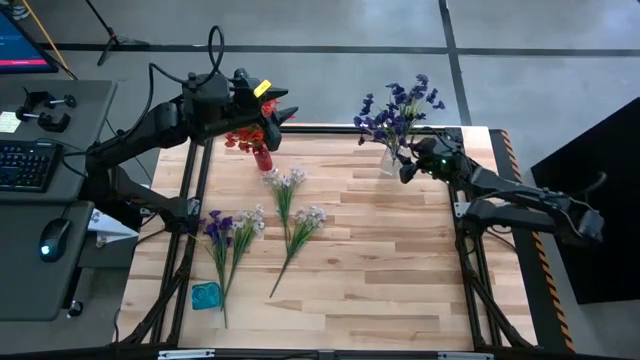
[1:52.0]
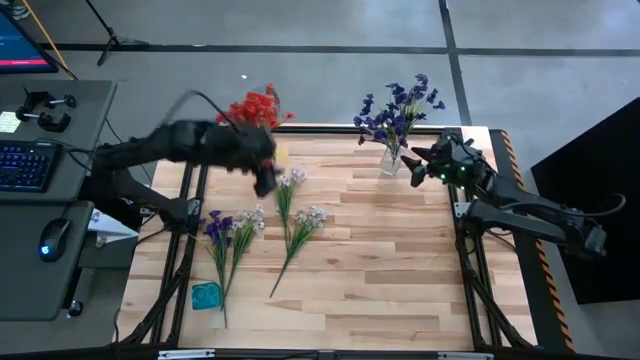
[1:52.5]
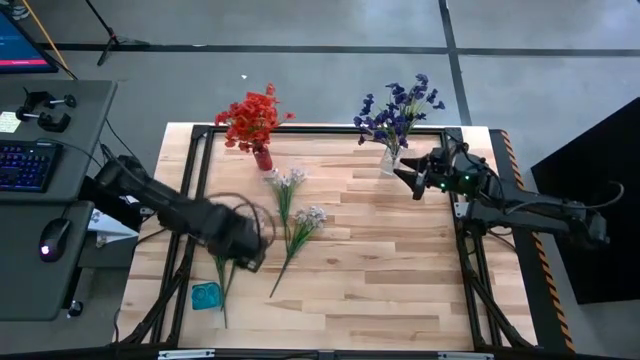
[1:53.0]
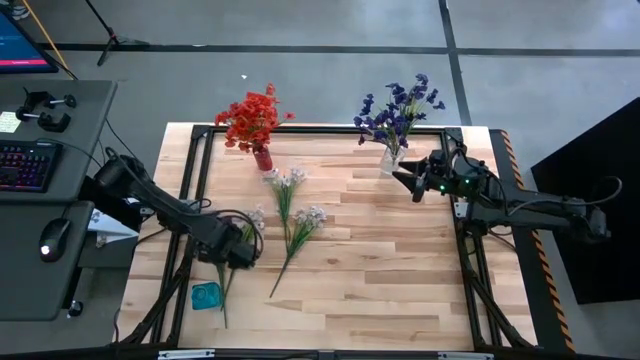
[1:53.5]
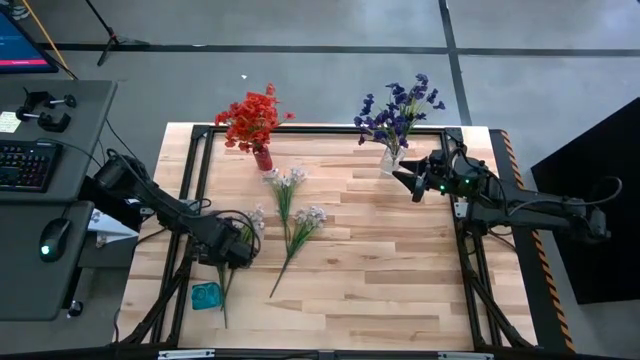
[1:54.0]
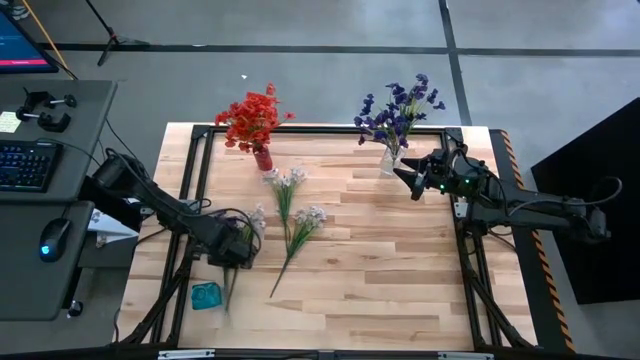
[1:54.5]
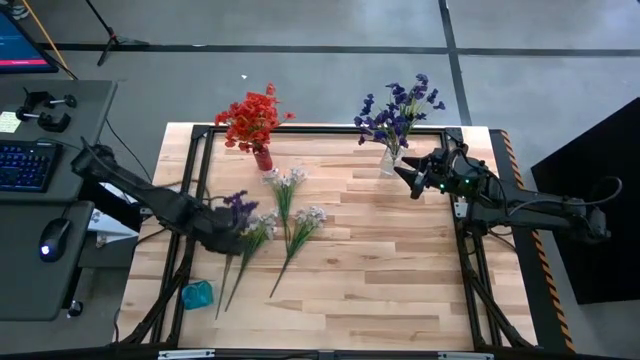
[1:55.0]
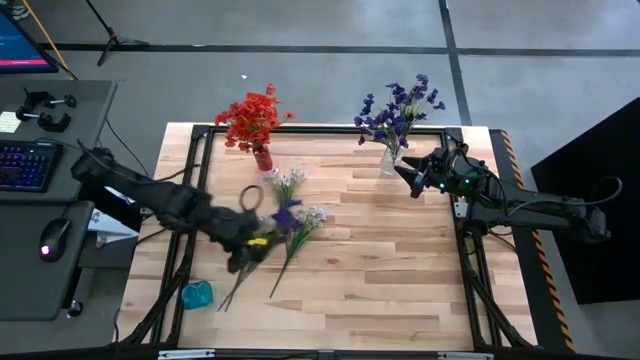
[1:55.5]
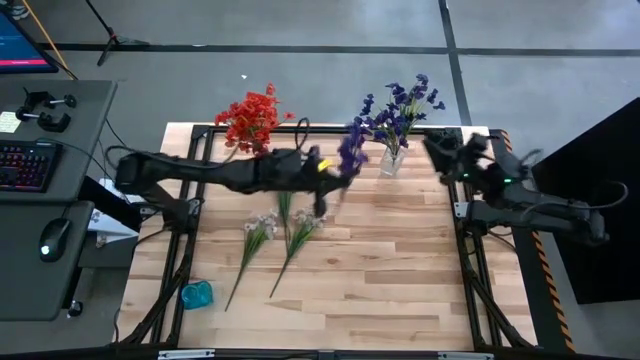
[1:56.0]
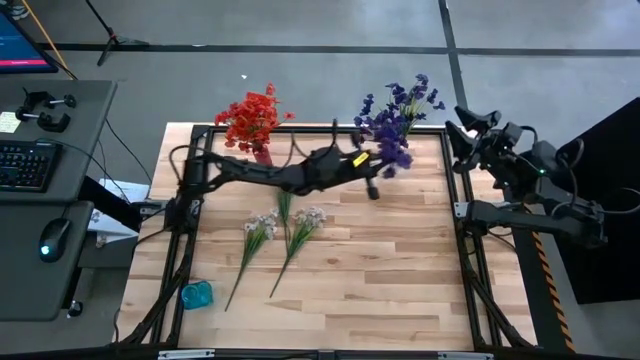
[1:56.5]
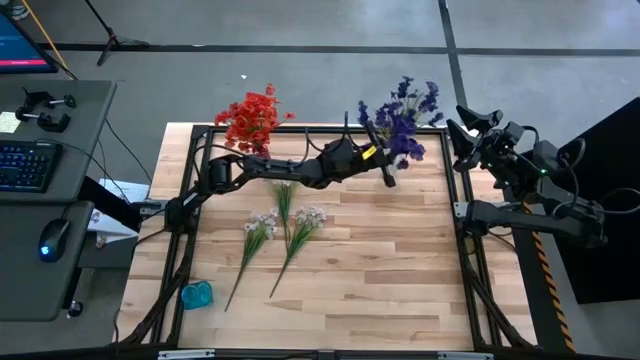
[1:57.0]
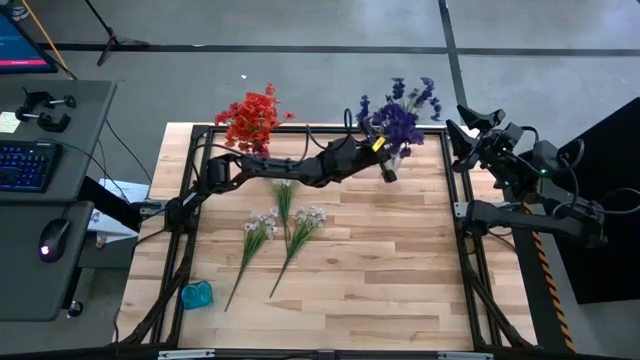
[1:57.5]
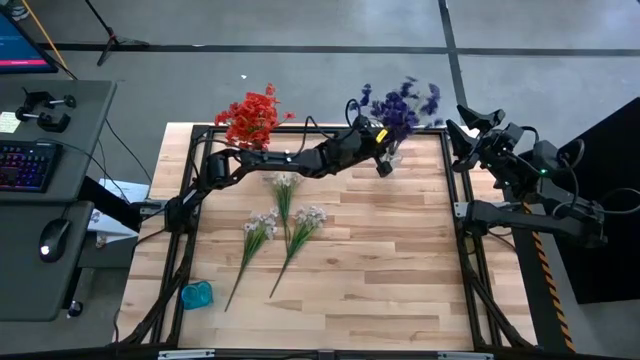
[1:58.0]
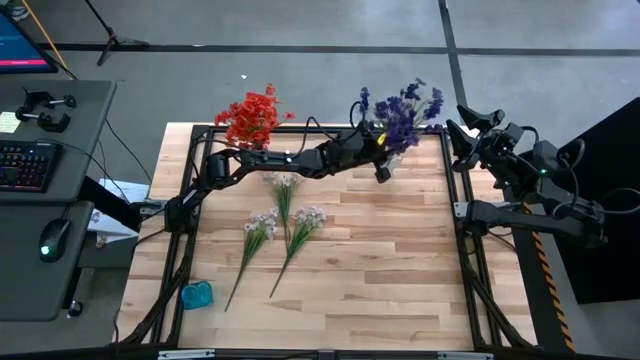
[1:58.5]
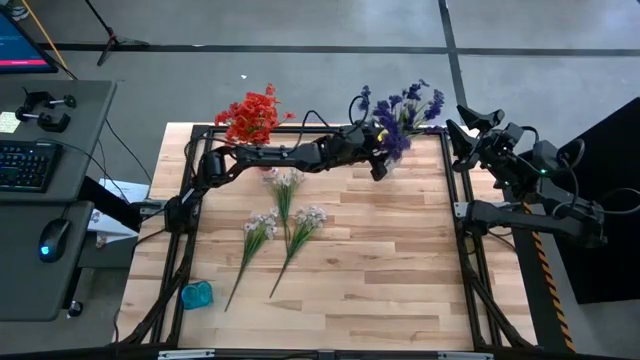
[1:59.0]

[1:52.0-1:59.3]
Task: Sort flowers into vase by color
Put the violet flowers into the transparent vase

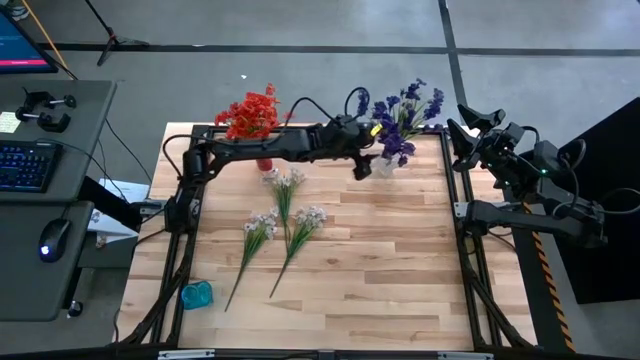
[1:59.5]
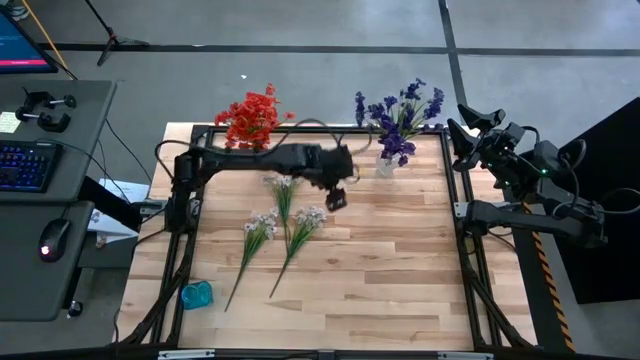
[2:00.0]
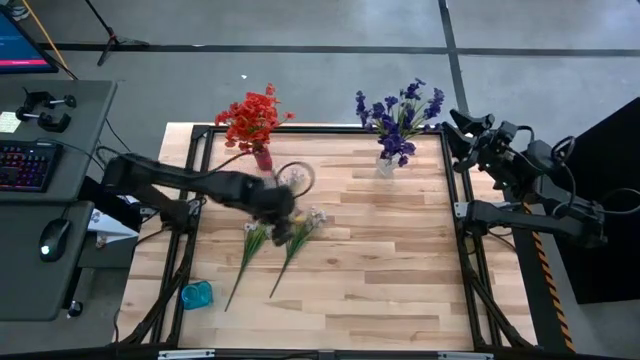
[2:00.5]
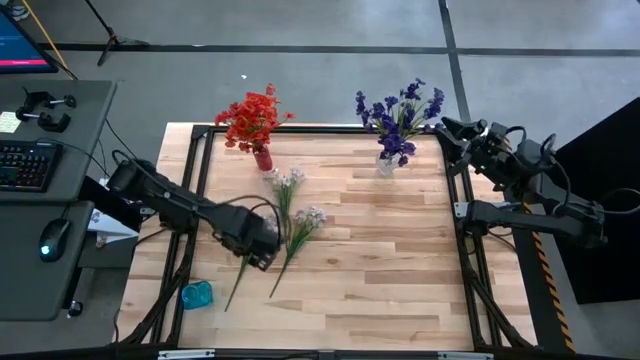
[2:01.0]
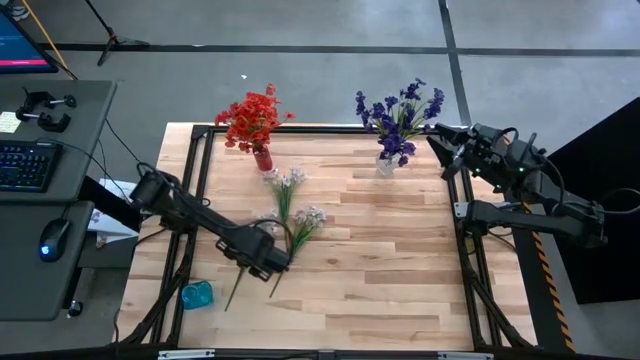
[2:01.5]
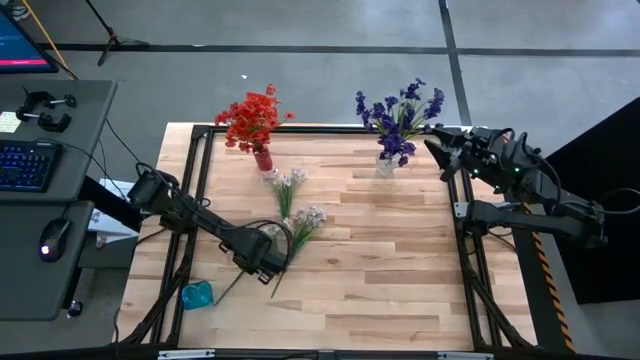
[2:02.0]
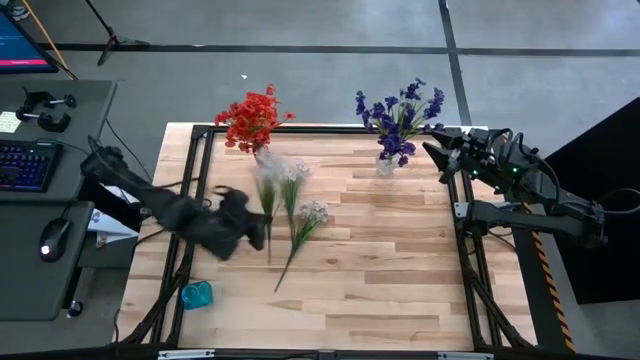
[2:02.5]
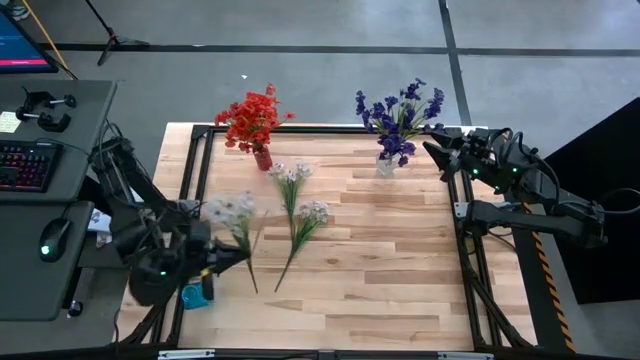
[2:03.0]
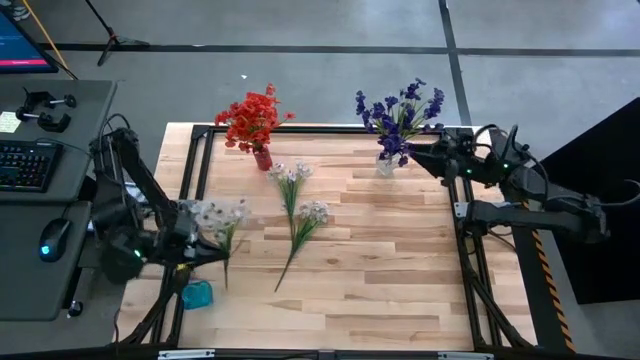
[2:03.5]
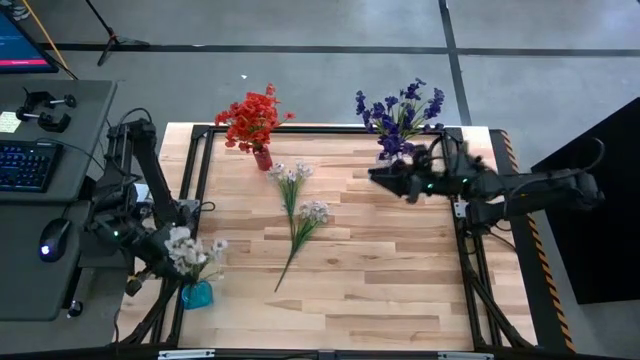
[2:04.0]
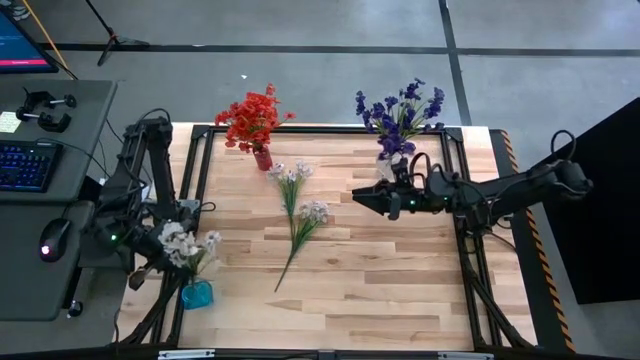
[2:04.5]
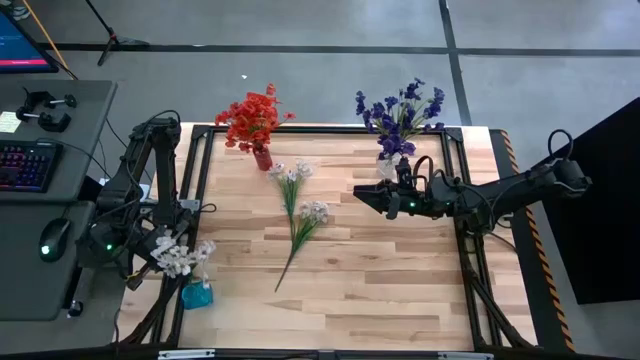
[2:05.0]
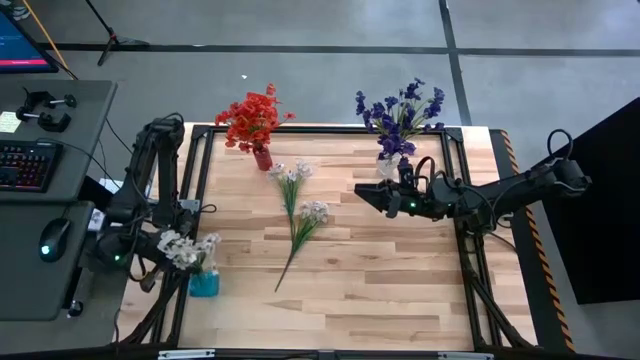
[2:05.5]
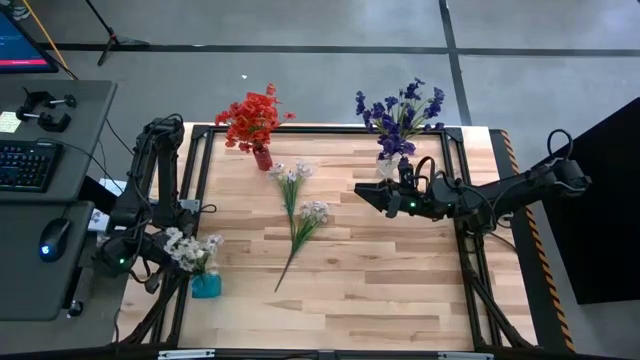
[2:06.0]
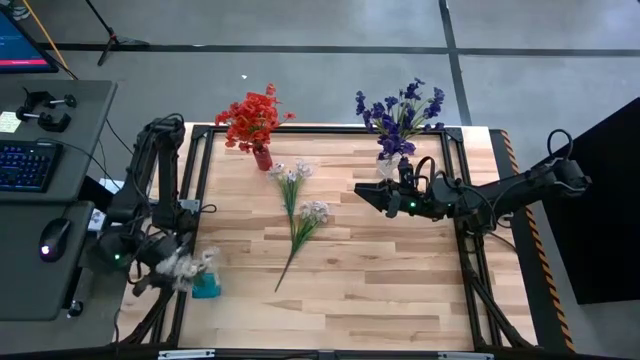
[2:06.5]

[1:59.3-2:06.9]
Put the left white flowers into the blue vase

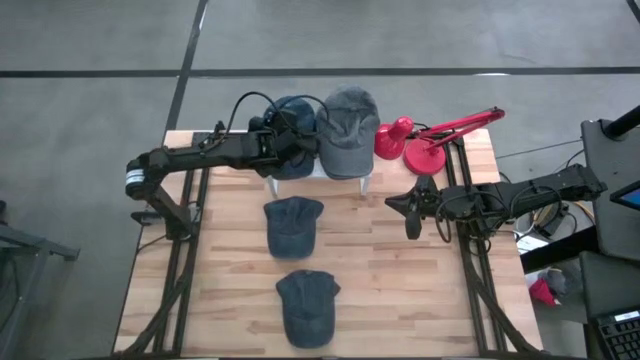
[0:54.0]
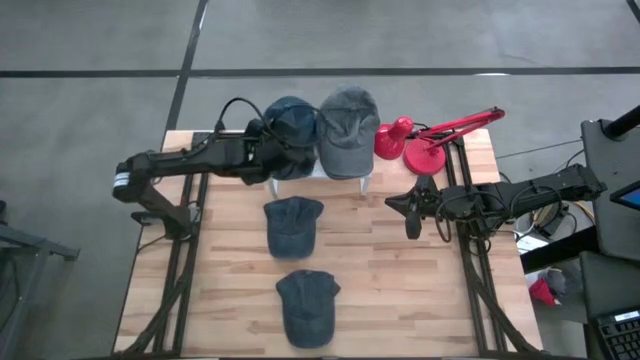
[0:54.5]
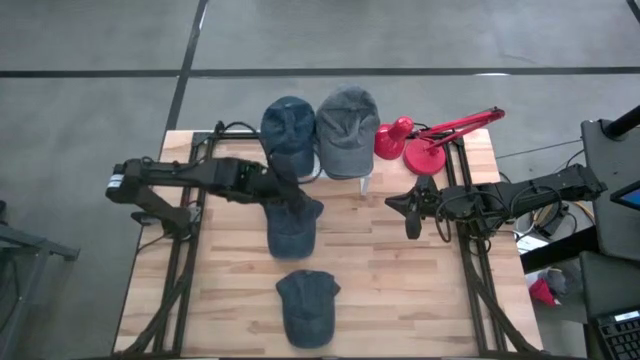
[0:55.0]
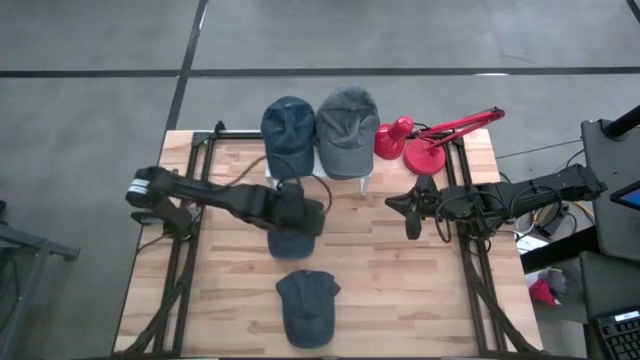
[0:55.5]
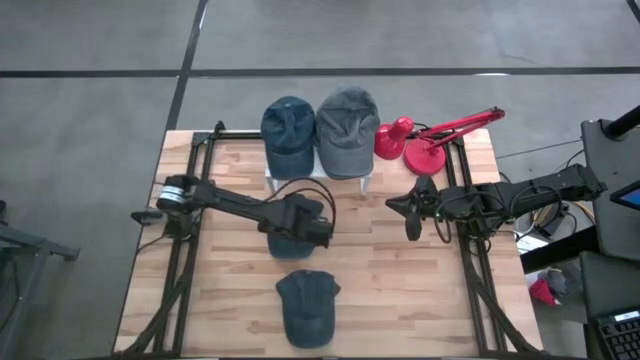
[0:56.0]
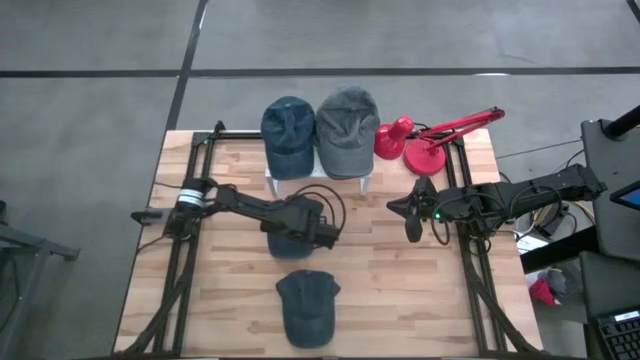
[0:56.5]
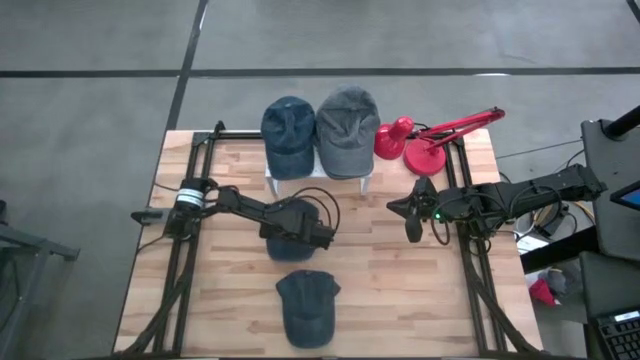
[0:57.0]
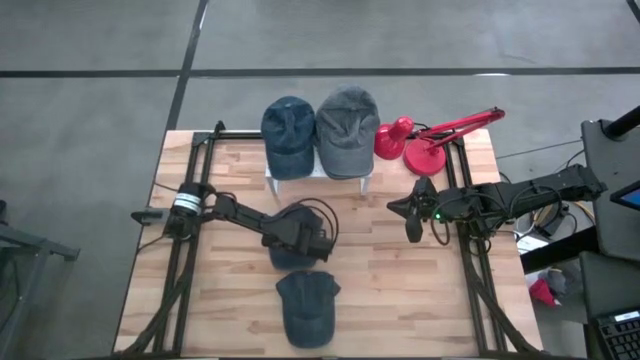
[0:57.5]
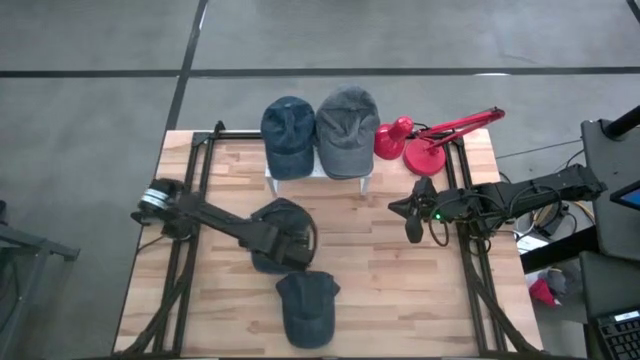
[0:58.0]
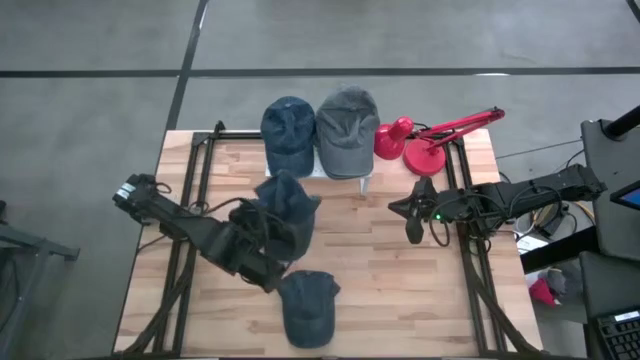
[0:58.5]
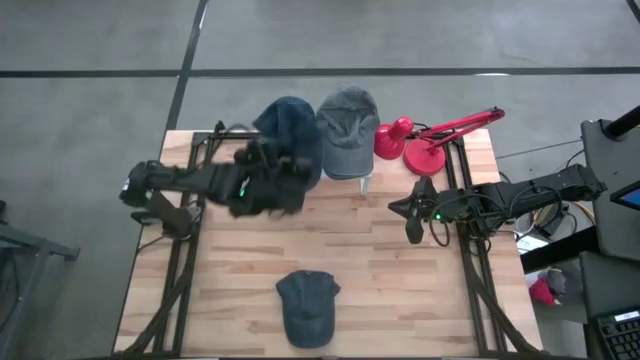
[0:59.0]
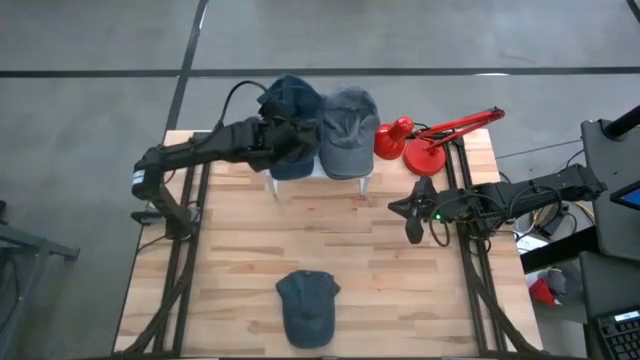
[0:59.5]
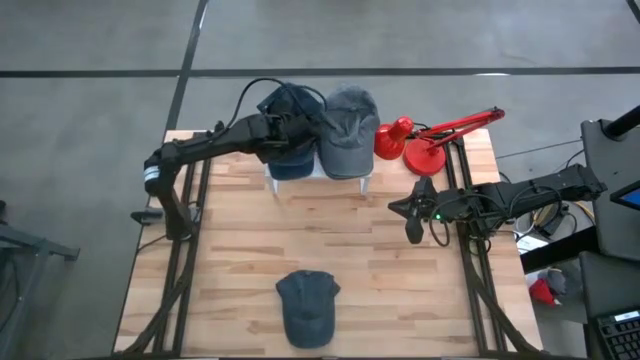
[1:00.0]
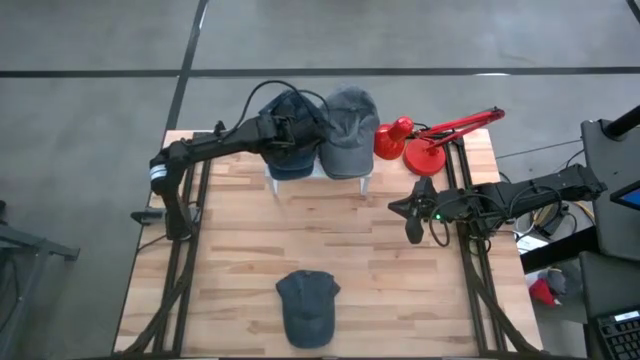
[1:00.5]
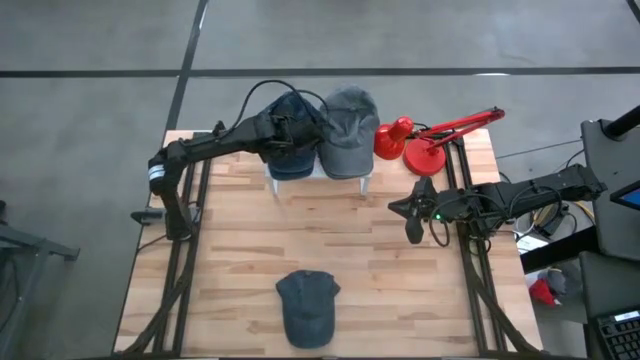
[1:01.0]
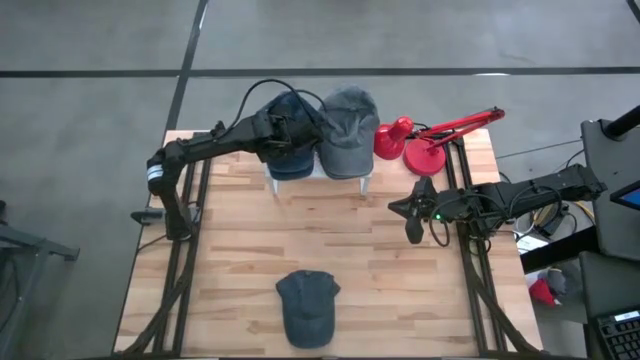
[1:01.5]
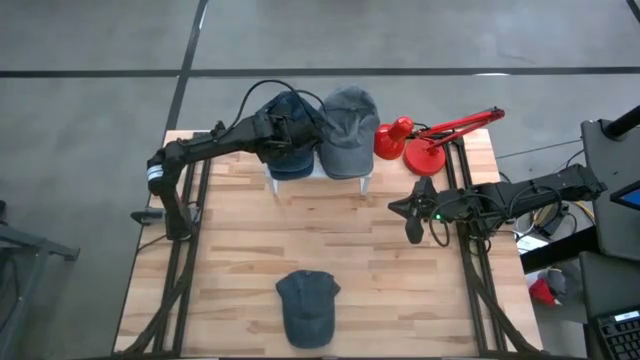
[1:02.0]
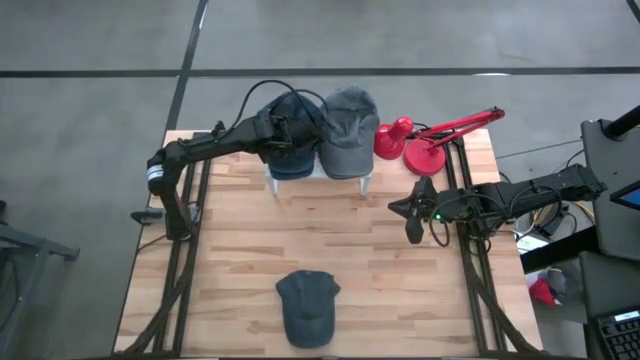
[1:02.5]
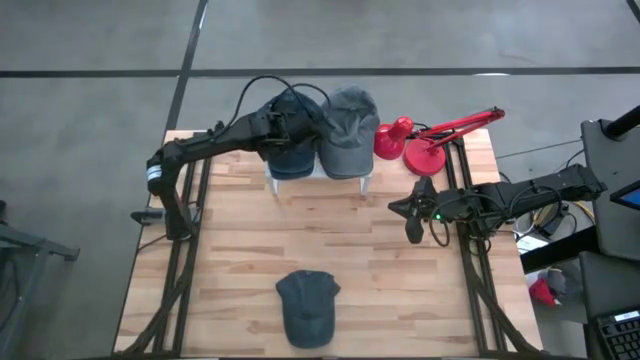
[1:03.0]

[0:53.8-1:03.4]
Task: Pick & Place hat
Stack the top black cap on the black cap on the shelf
